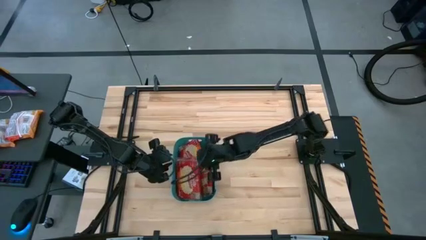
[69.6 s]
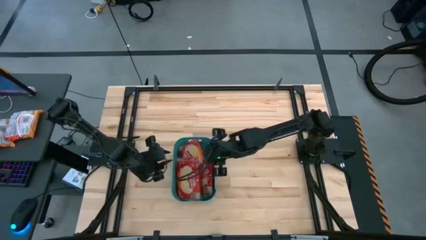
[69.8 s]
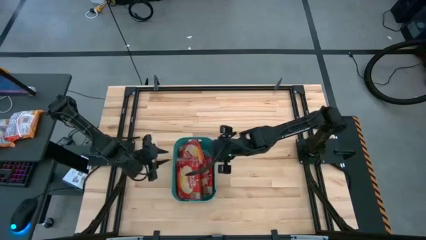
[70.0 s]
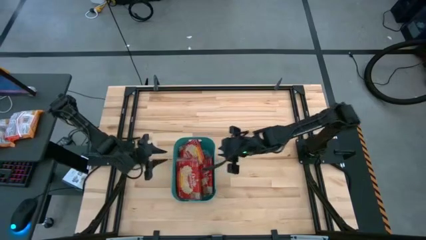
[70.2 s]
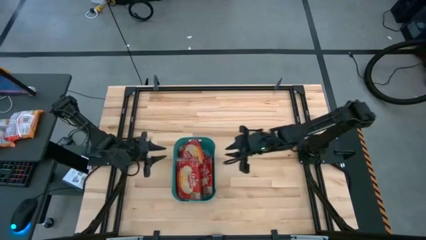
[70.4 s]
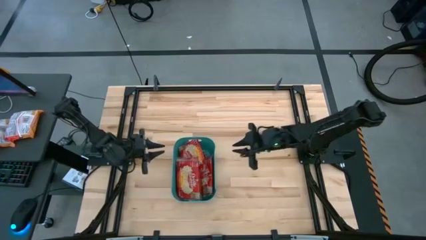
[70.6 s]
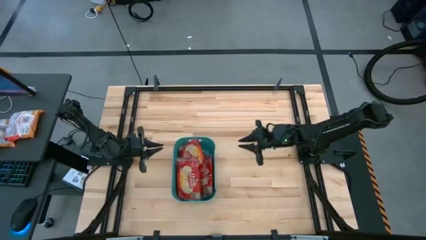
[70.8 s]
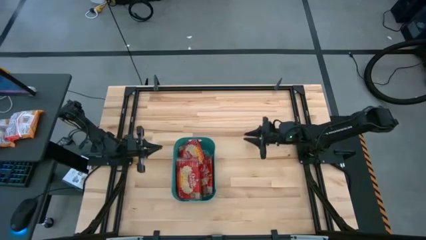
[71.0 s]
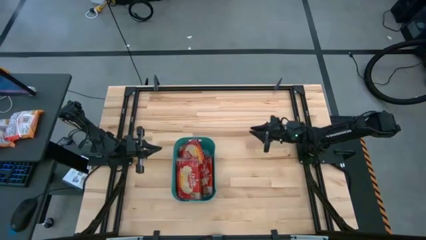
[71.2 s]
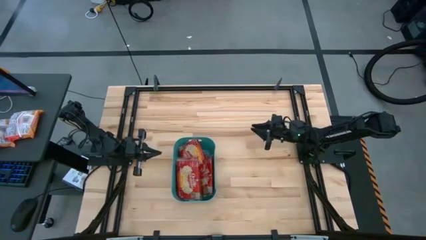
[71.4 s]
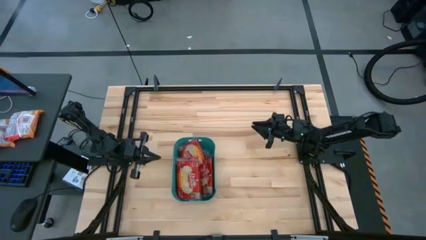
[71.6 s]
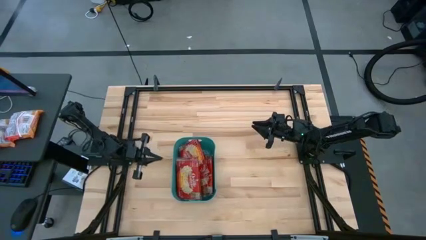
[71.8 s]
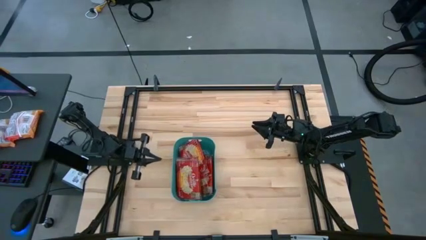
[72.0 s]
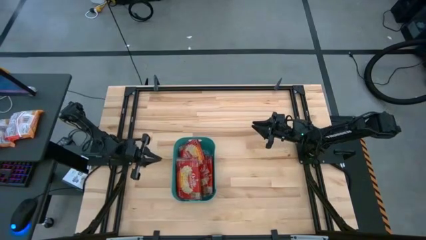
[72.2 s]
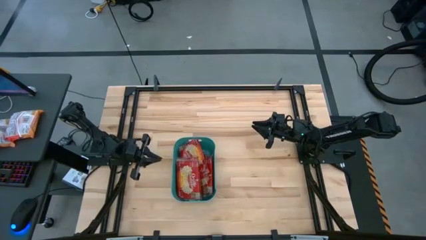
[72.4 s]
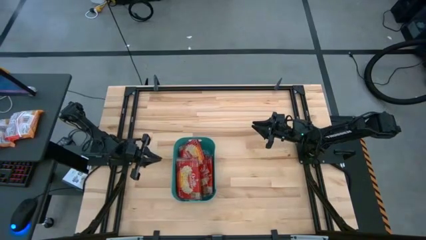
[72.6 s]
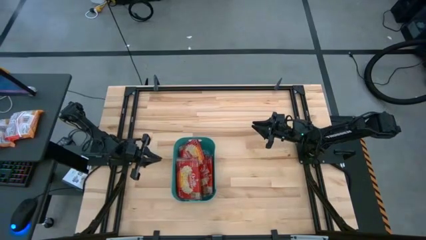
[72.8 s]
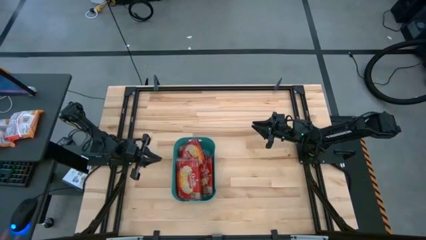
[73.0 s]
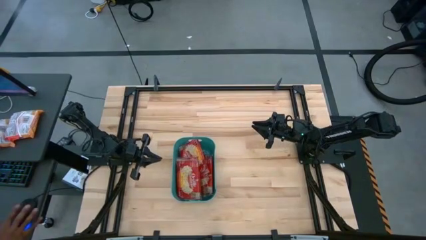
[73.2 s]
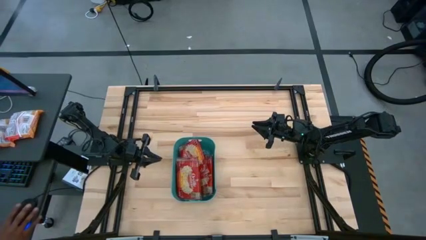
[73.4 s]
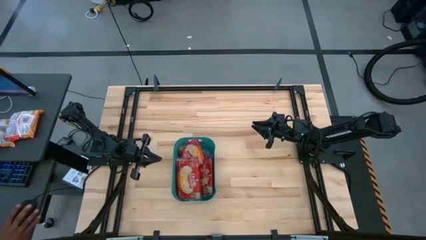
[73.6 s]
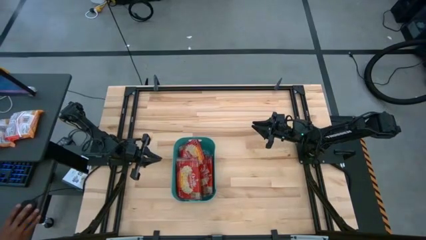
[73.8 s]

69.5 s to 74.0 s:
Task: Sort popcorn bags into baskets
Return to Home Position

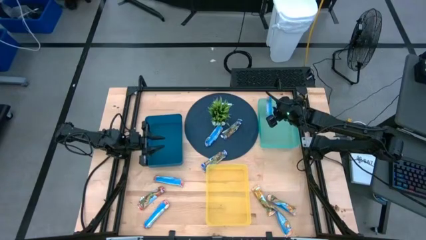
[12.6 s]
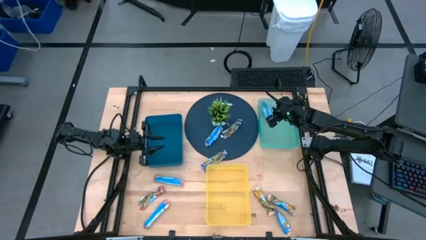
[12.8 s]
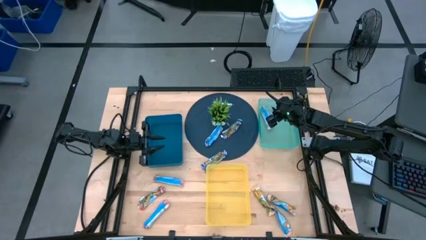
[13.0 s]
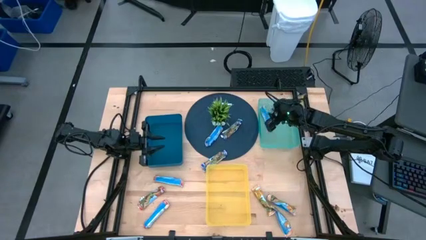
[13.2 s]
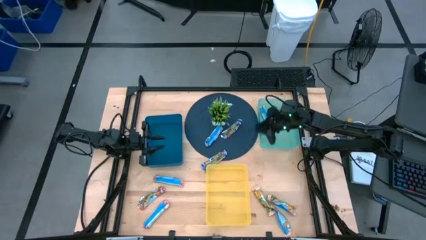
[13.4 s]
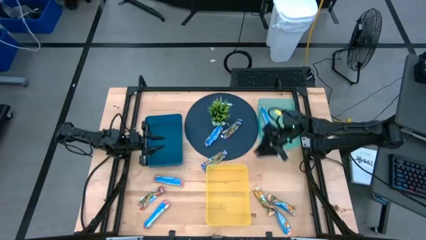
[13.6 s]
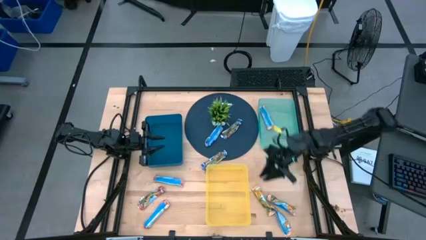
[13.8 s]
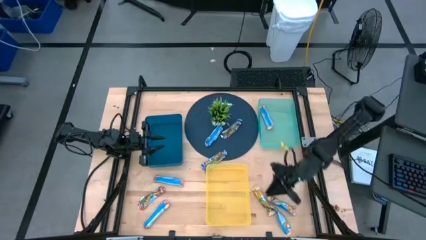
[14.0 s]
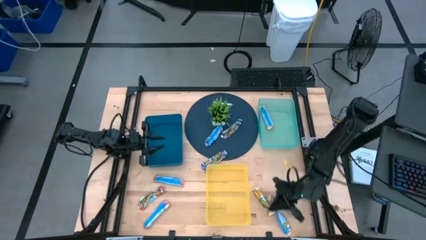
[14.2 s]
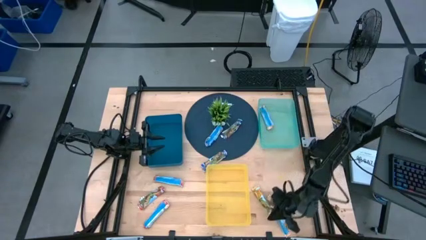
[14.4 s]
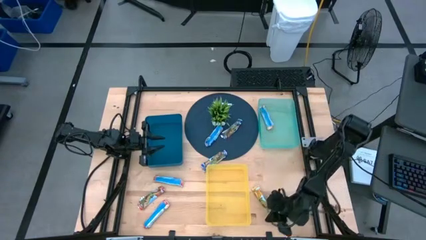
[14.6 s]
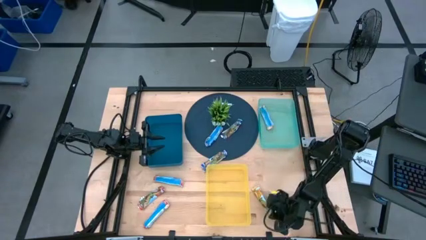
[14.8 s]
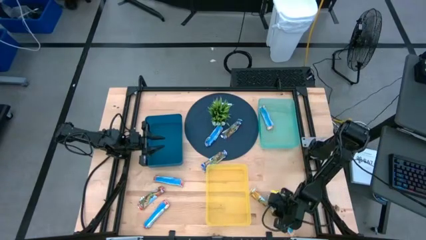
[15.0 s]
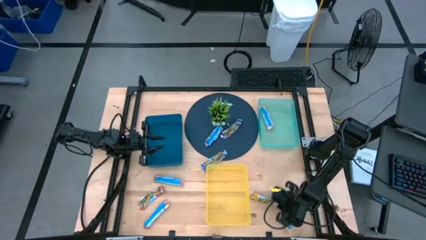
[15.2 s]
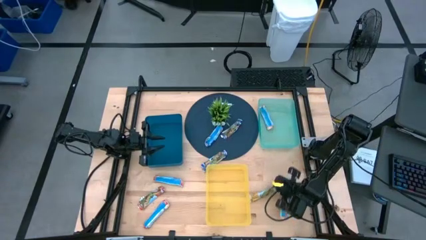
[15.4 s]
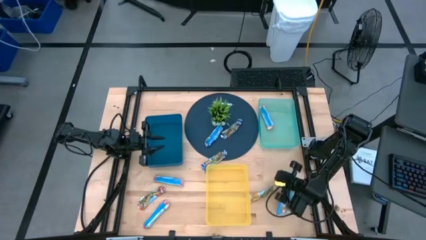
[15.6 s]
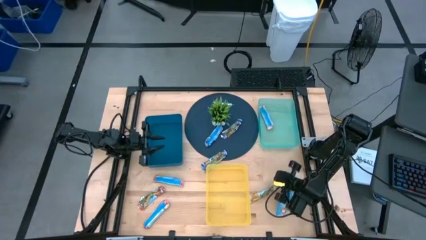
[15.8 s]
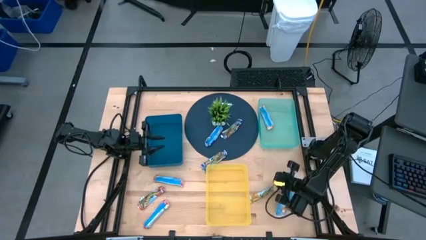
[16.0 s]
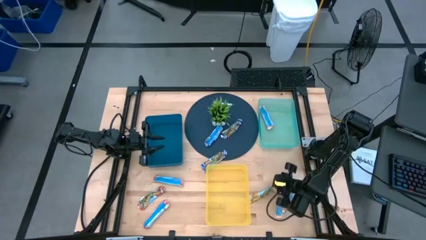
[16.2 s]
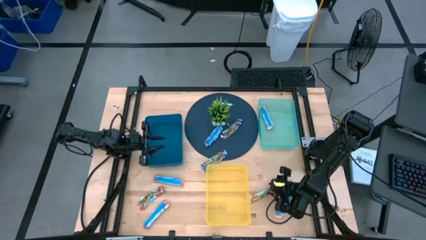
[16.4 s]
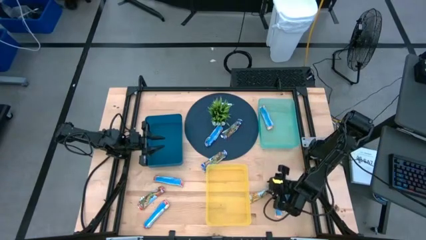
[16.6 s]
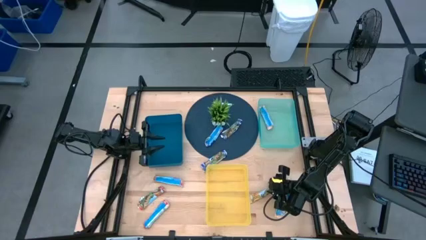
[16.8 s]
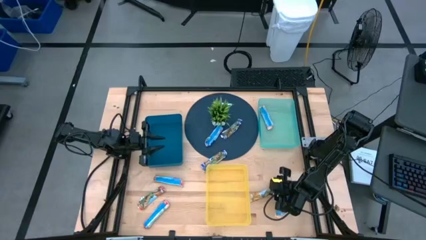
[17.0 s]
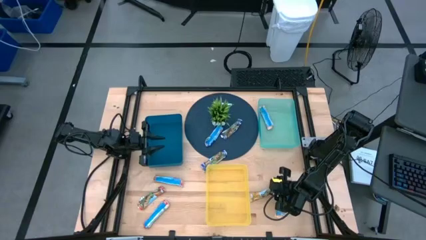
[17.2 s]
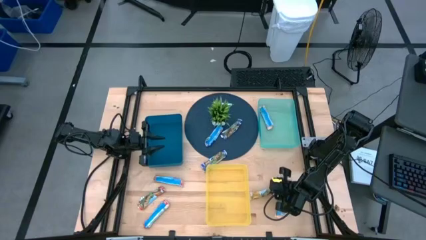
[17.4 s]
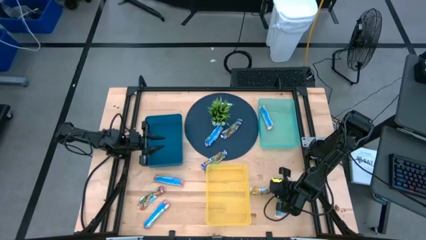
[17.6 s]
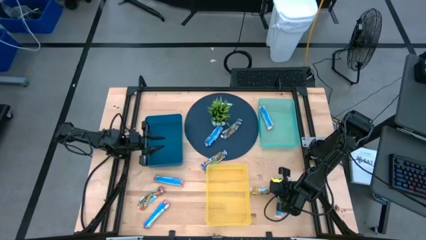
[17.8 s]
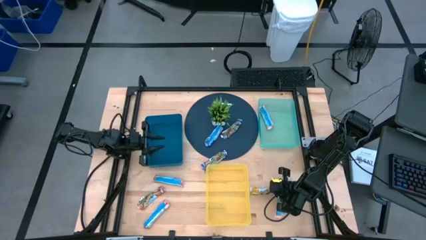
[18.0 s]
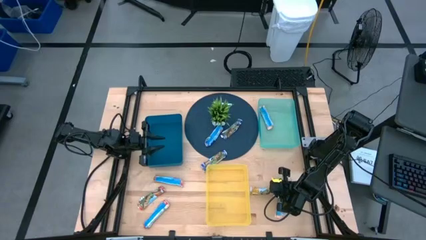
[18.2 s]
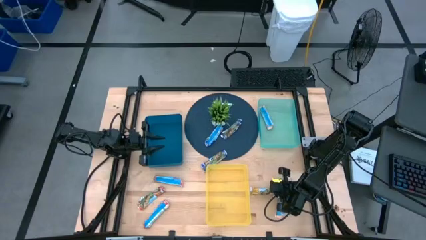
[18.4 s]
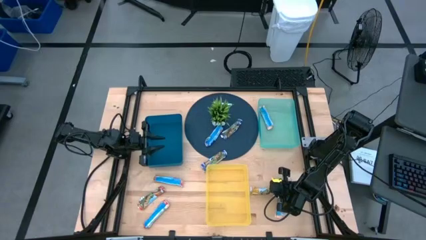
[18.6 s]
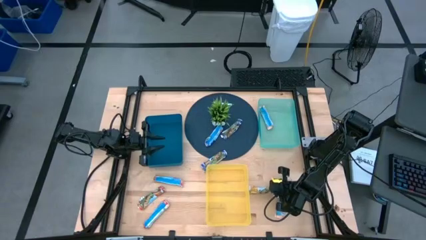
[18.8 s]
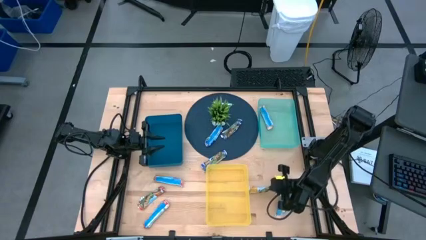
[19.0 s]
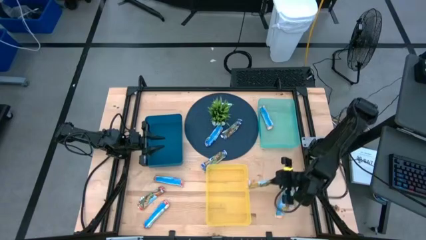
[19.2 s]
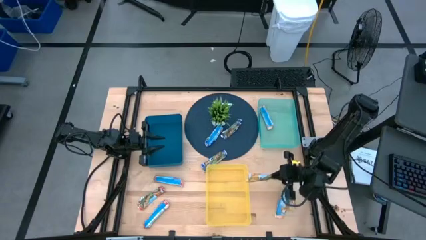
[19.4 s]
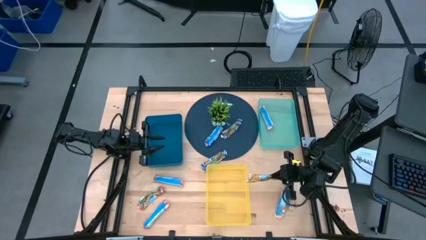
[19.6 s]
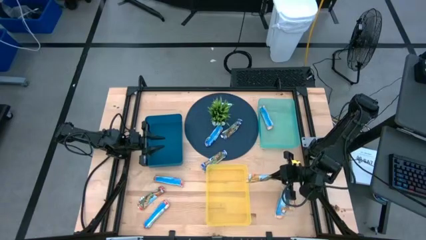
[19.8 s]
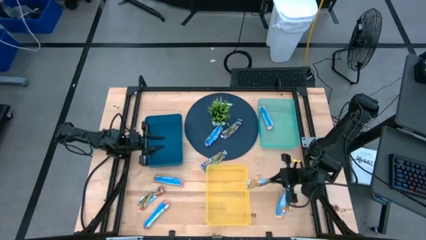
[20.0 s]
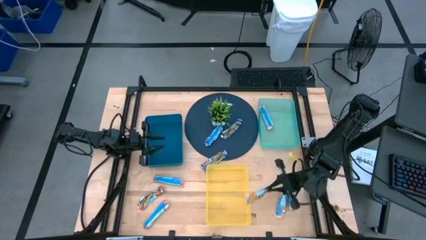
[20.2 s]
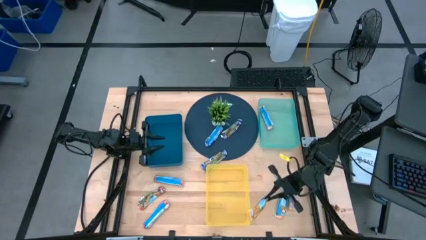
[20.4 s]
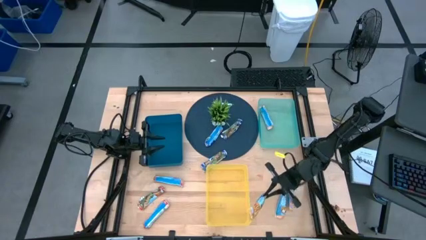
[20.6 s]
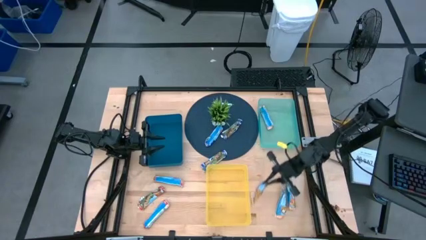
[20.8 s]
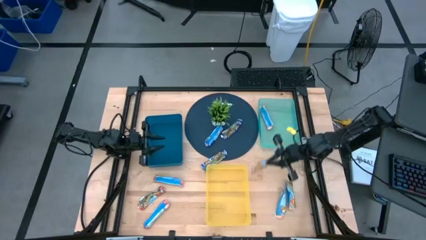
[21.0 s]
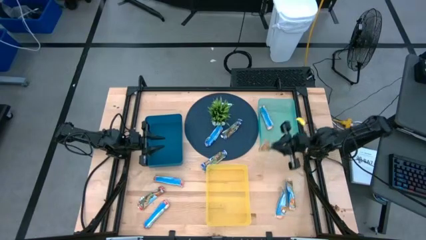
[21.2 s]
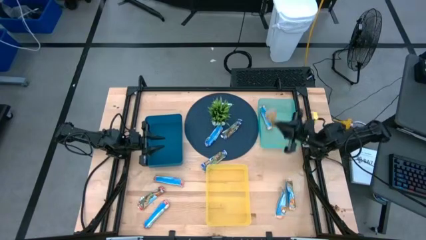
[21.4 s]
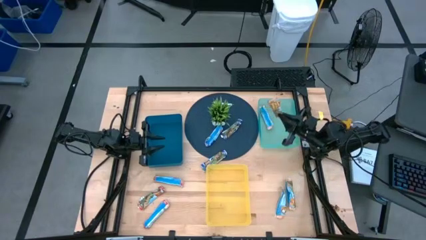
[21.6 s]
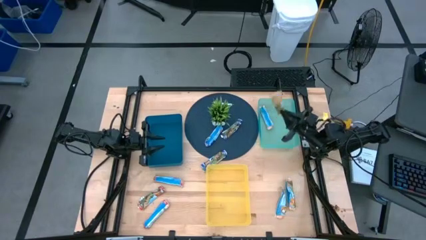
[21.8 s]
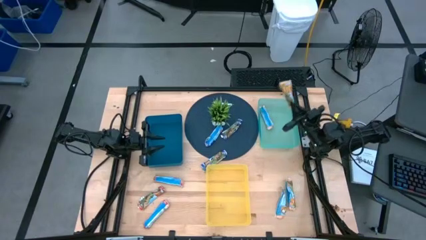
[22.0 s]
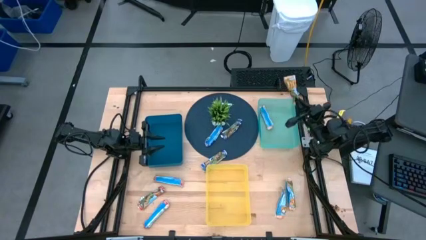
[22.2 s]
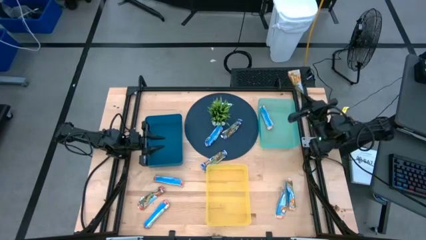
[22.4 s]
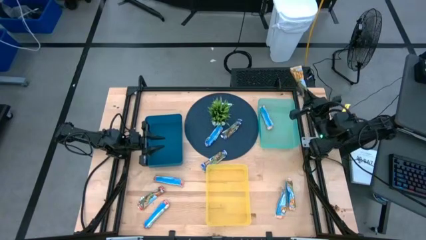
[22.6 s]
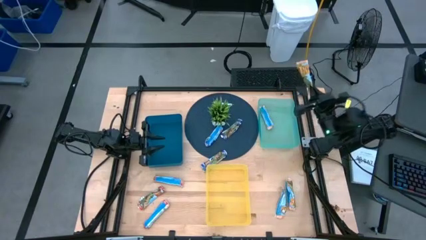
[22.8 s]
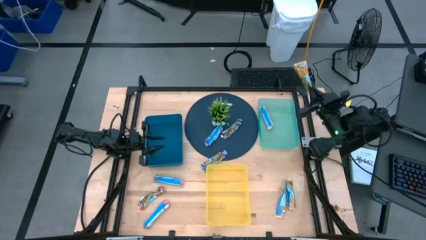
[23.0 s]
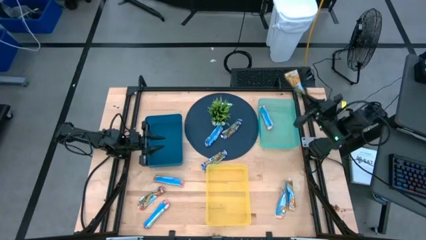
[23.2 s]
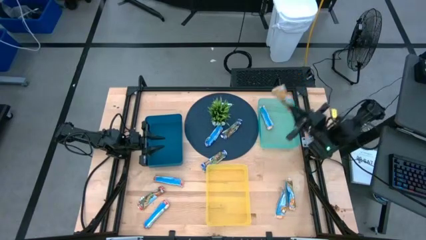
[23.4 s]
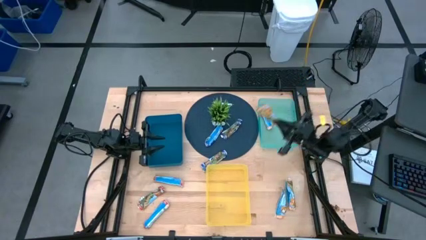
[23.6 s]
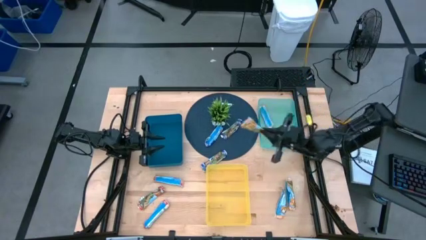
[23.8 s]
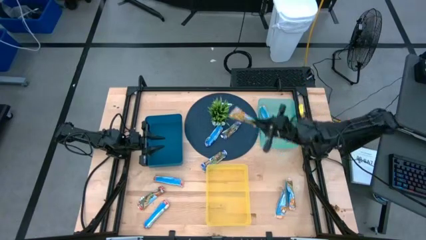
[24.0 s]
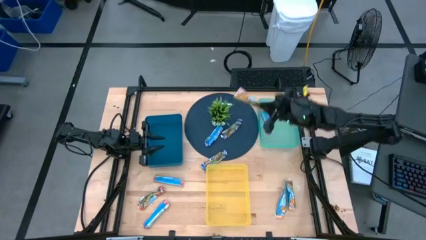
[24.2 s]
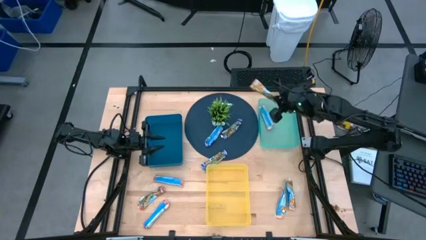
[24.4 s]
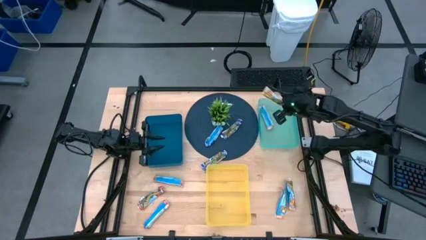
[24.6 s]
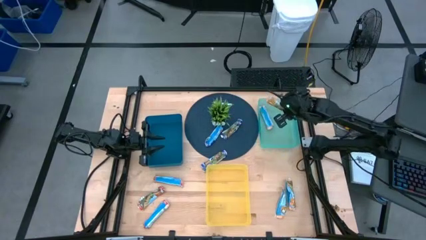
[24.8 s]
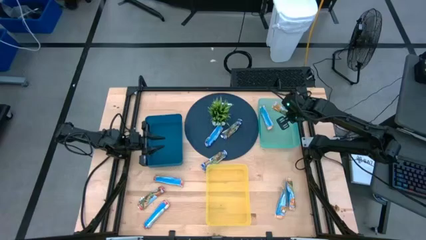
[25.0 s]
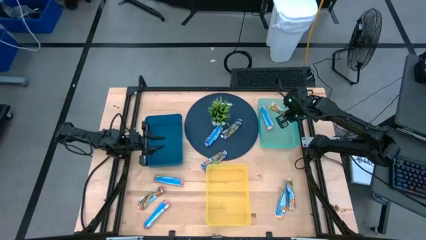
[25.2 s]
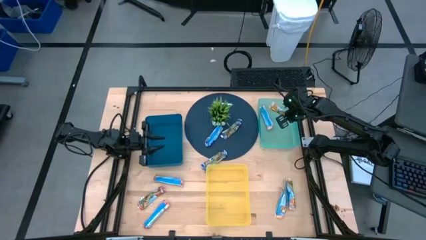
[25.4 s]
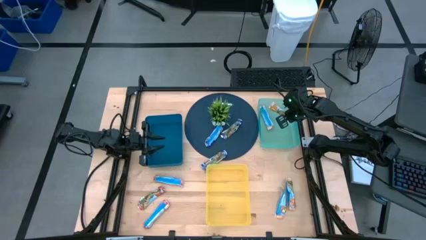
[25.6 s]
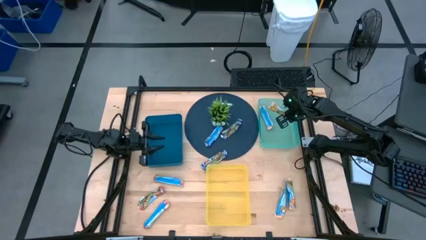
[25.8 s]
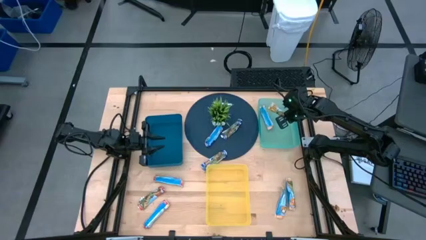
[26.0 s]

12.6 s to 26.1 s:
Task: Pick and place Granola Bars by type
Put the yellow granola bar into the green bin
